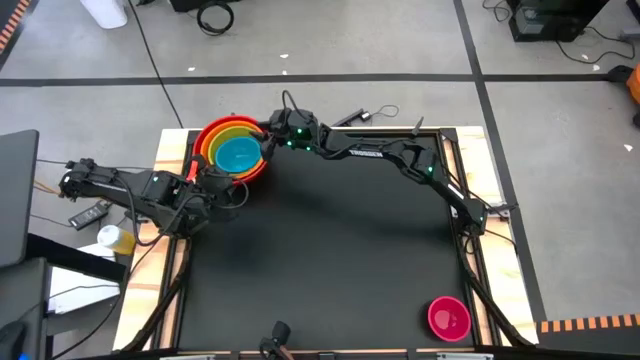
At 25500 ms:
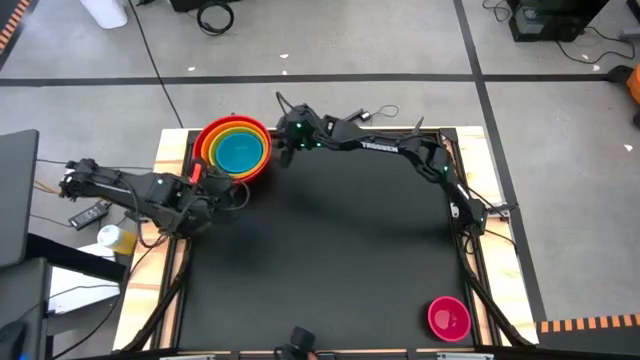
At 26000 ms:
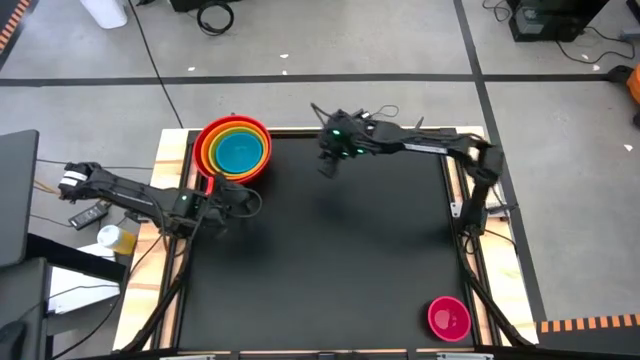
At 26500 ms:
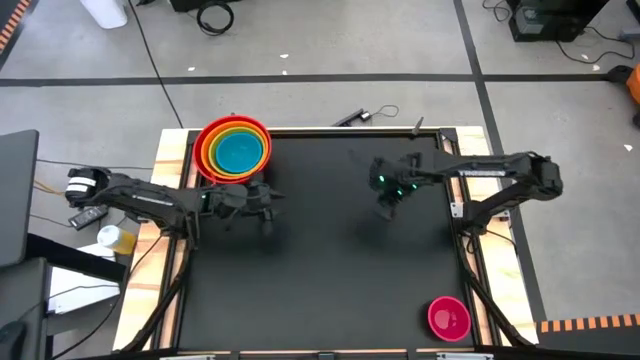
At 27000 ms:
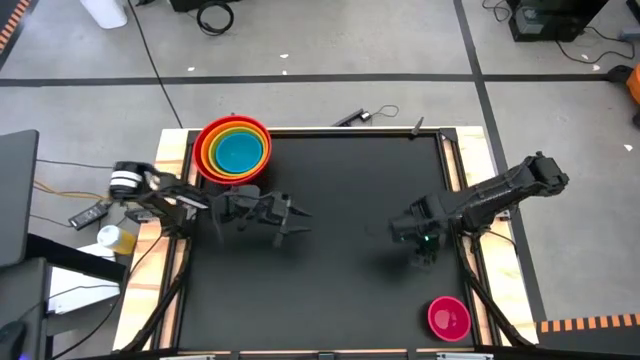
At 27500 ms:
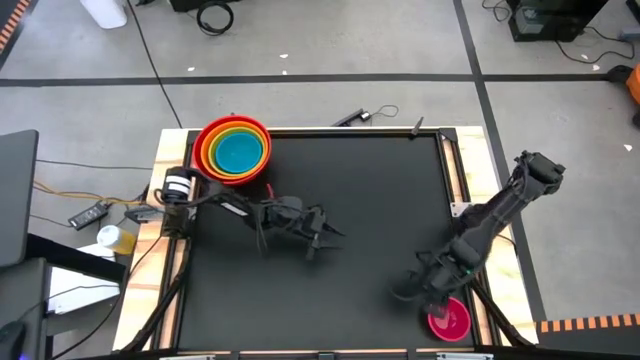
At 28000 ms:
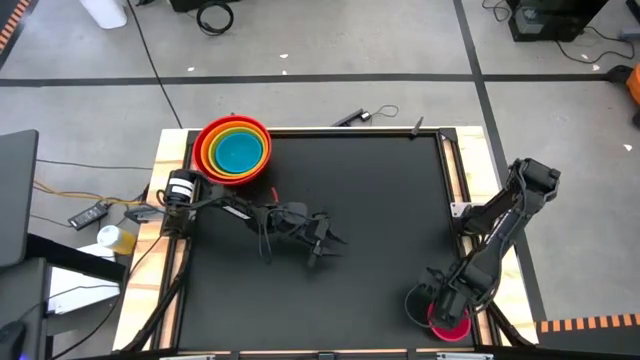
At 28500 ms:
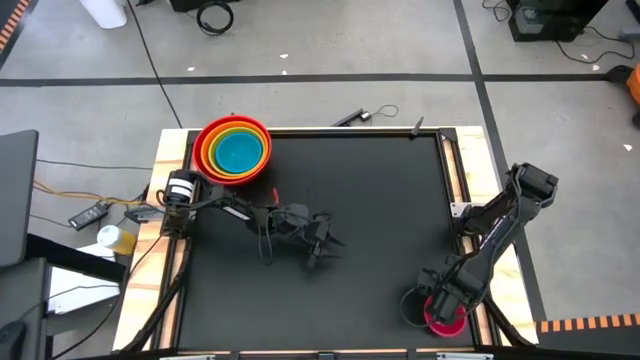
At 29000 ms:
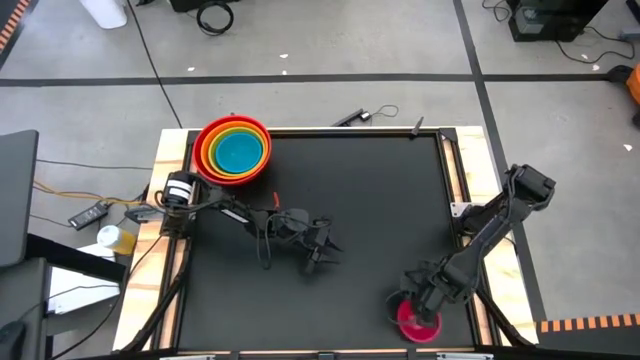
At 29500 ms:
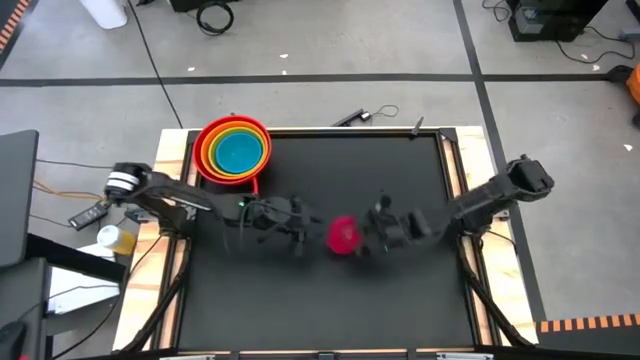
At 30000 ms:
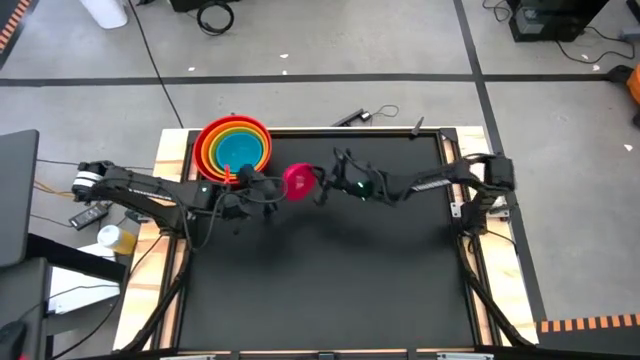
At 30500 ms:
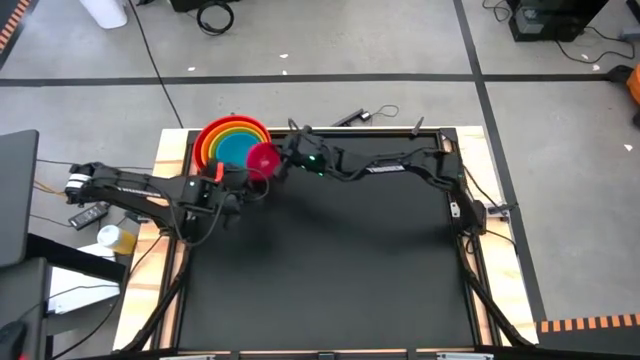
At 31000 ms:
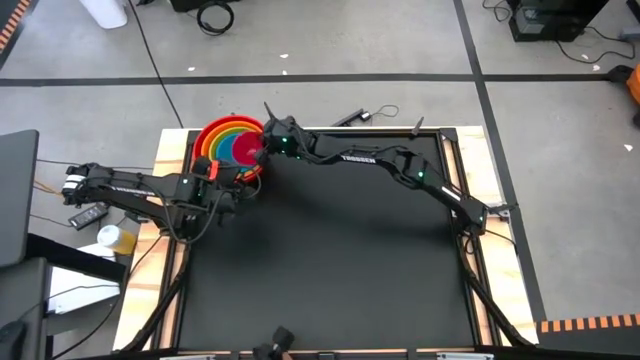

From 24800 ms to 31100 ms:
Stack the pink bowl on top of the blue bowl

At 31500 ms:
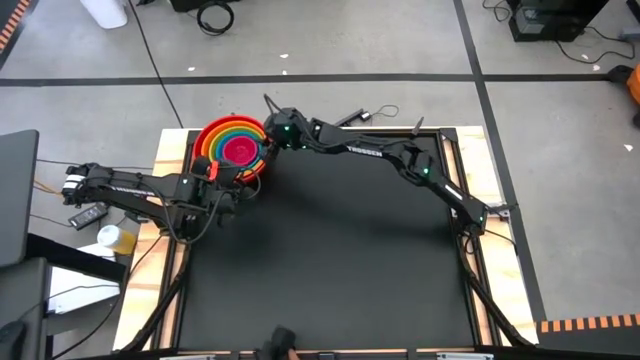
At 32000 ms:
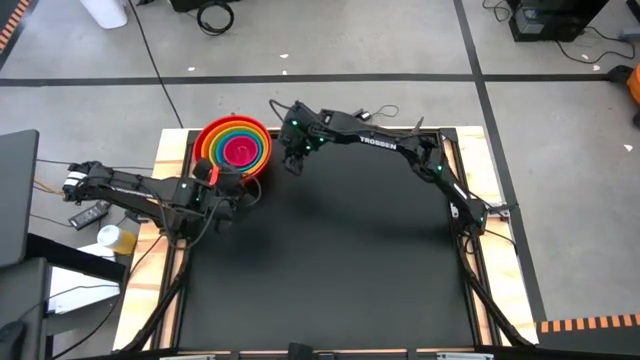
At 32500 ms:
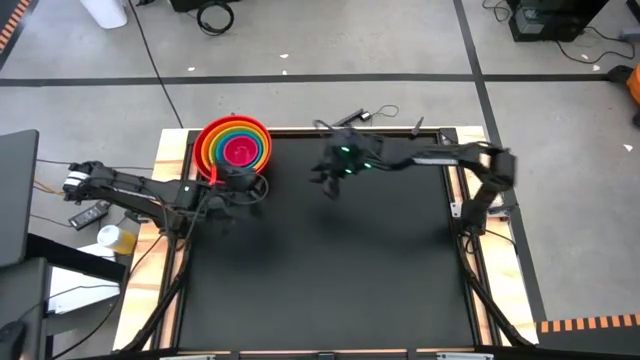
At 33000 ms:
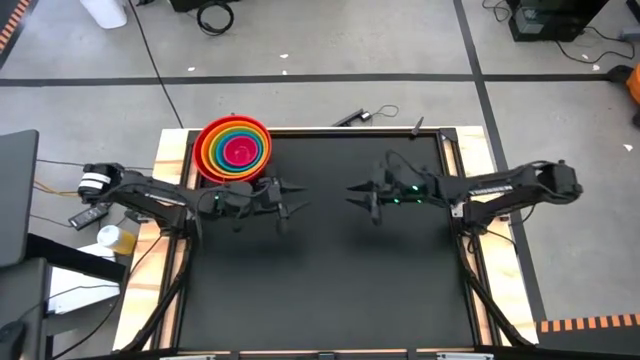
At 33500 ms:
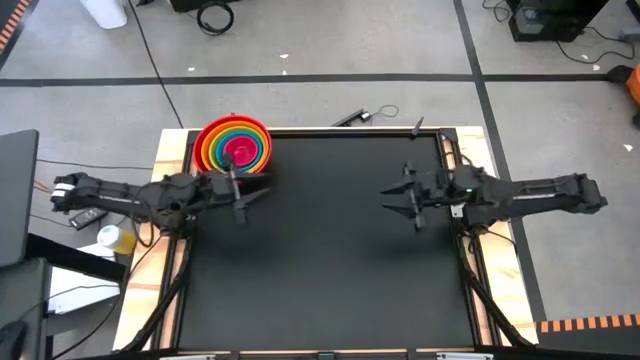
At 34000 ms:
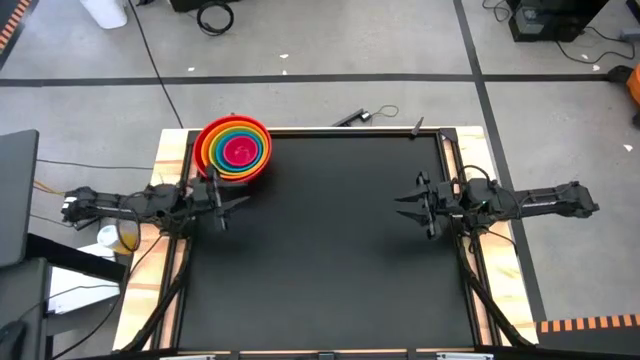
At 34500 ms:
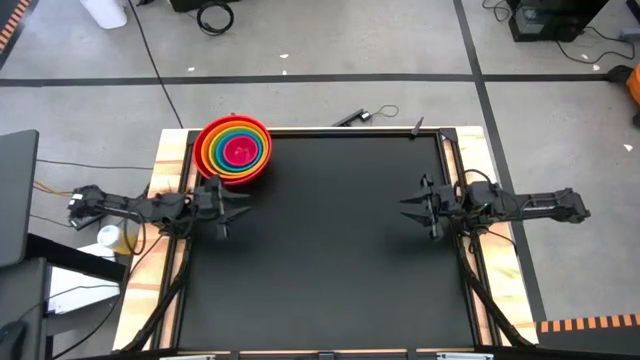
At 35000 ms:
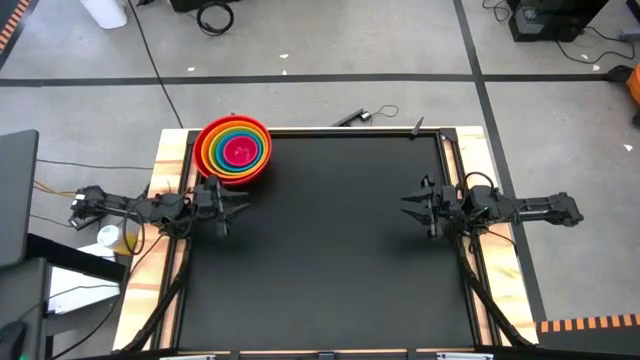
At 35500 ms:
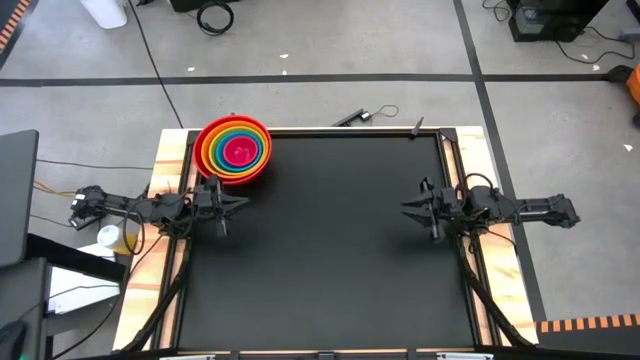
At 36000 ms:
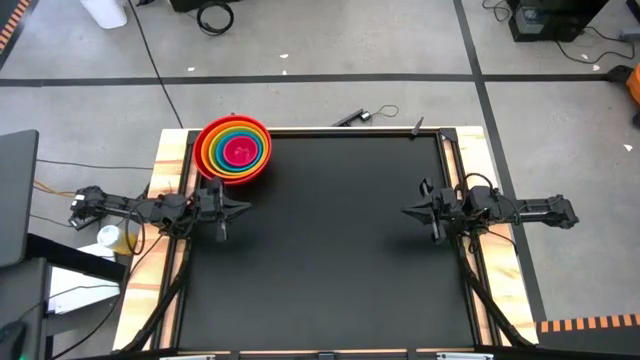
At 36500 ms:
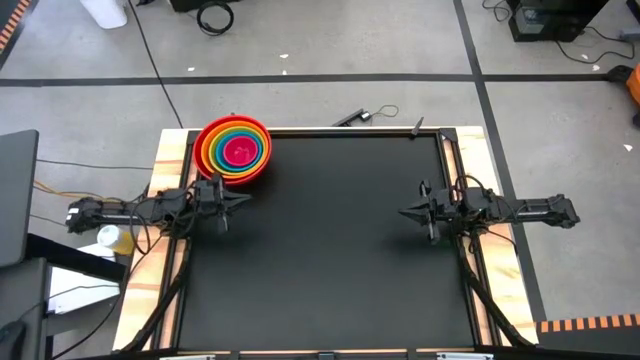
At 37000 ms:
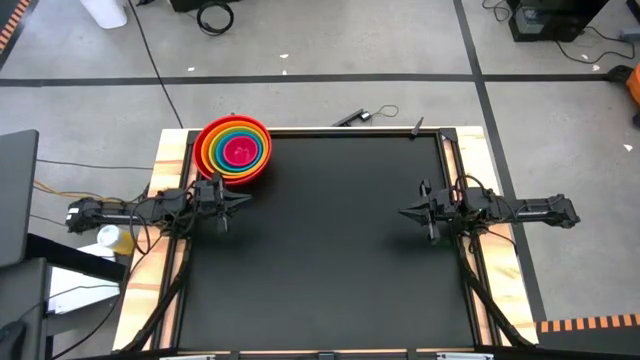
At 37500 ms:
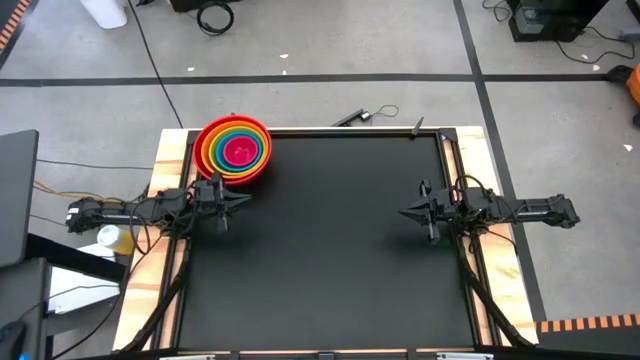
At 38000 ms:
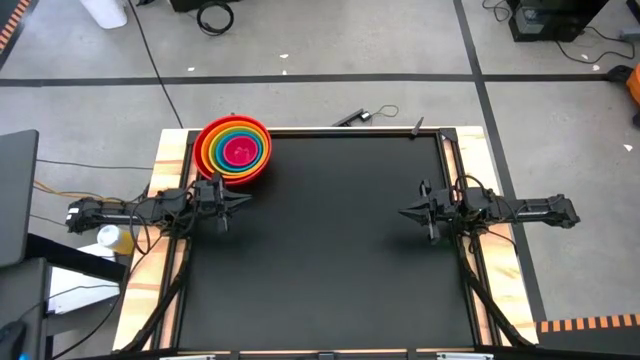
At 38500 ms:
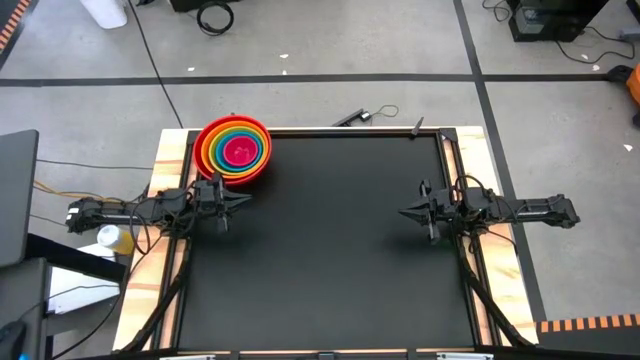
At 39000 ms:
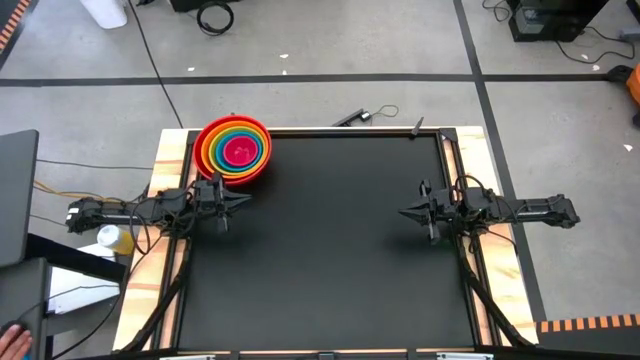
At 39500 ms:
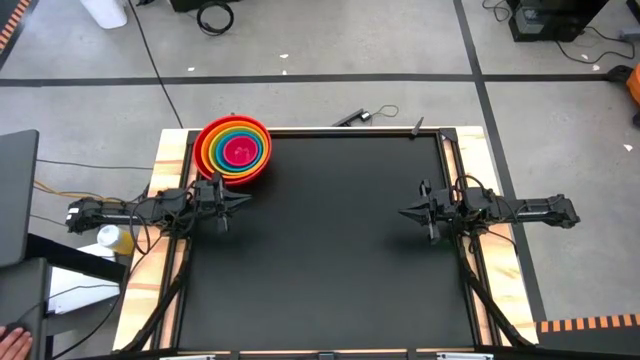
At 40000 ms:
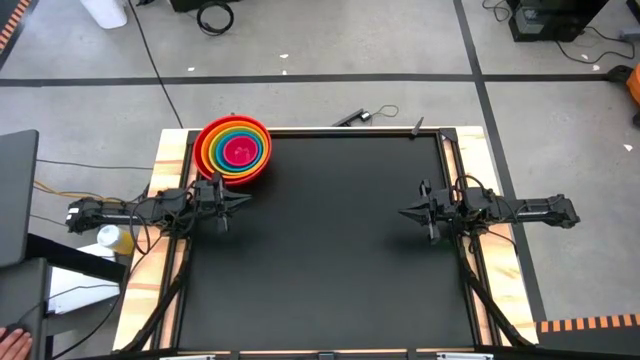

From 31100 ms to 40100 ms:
Return to Home Position
